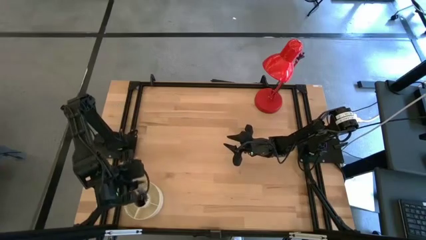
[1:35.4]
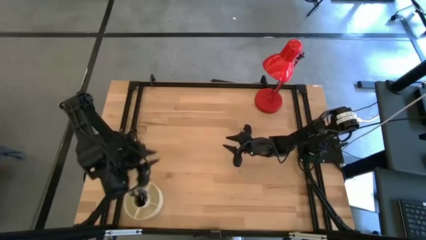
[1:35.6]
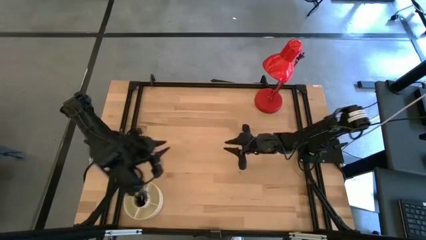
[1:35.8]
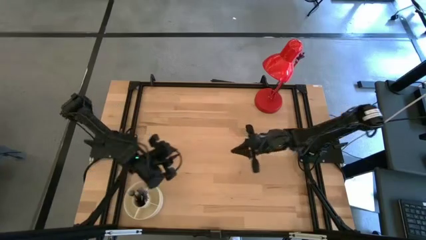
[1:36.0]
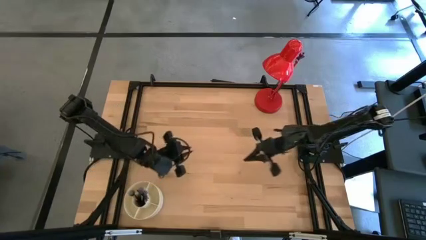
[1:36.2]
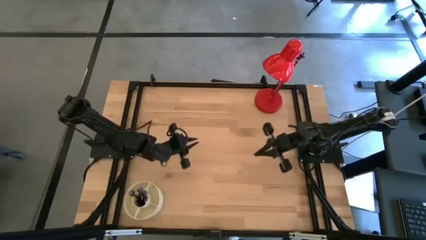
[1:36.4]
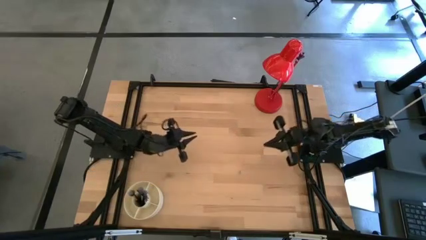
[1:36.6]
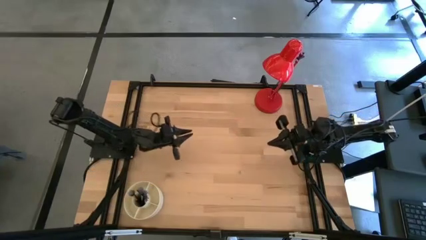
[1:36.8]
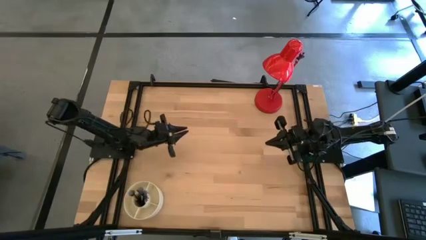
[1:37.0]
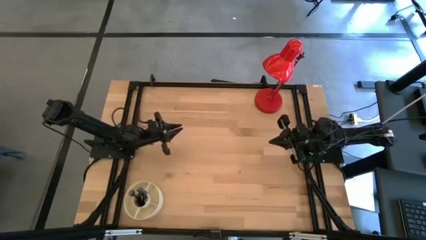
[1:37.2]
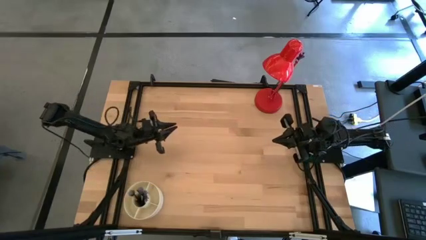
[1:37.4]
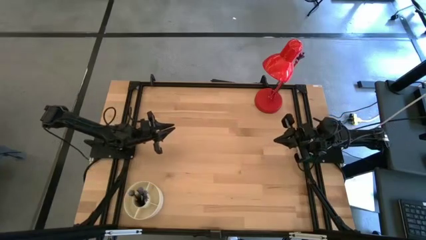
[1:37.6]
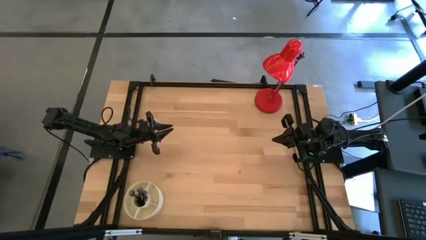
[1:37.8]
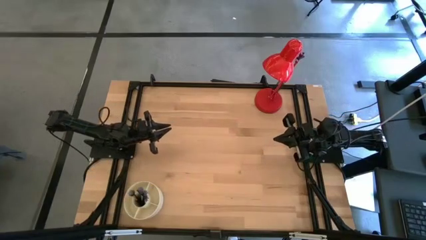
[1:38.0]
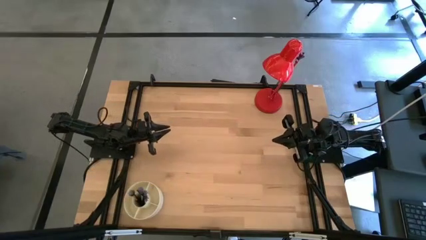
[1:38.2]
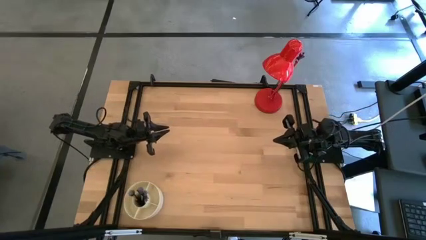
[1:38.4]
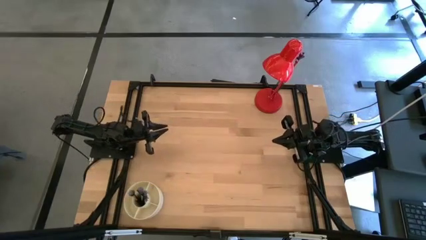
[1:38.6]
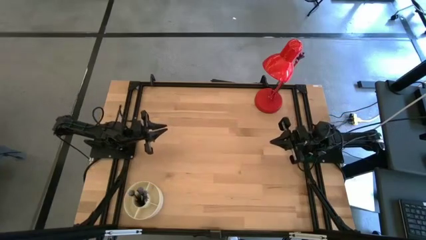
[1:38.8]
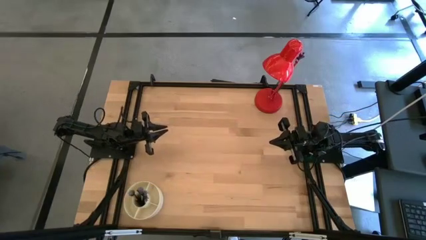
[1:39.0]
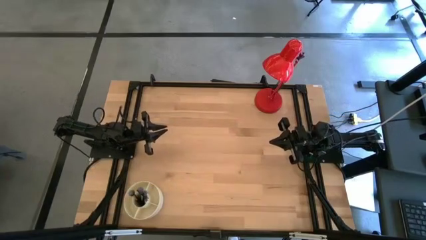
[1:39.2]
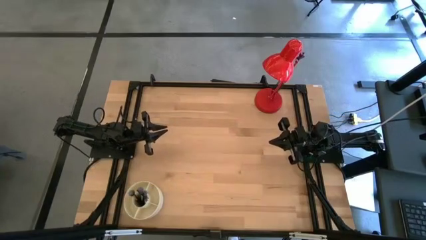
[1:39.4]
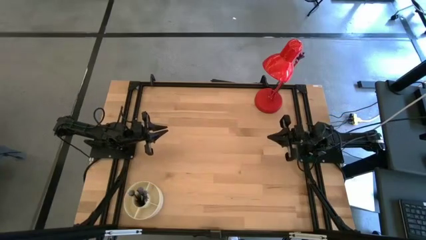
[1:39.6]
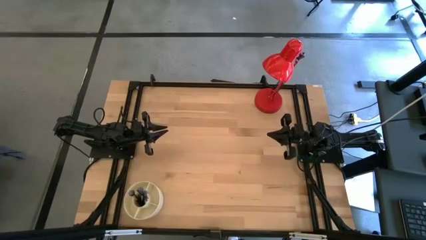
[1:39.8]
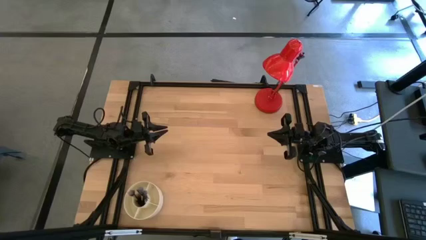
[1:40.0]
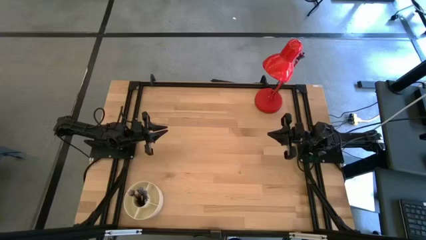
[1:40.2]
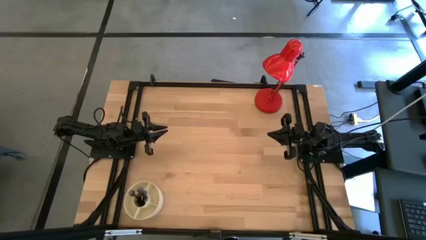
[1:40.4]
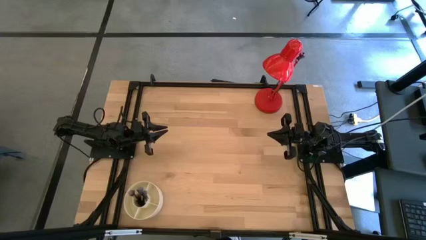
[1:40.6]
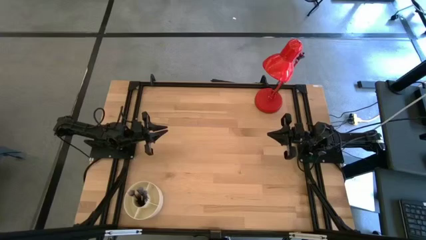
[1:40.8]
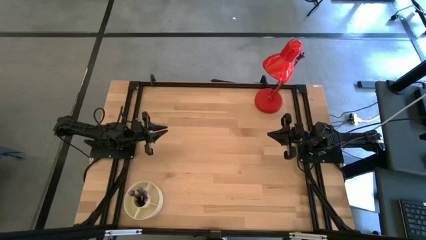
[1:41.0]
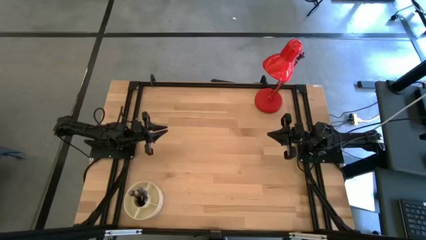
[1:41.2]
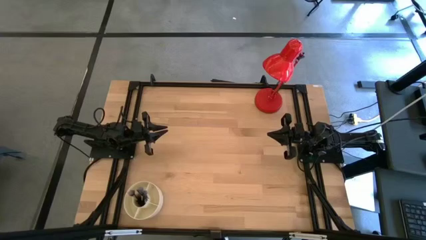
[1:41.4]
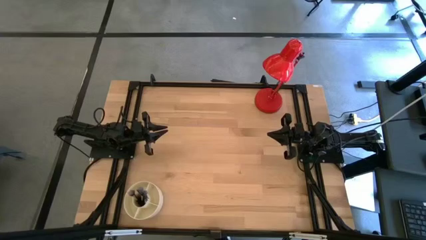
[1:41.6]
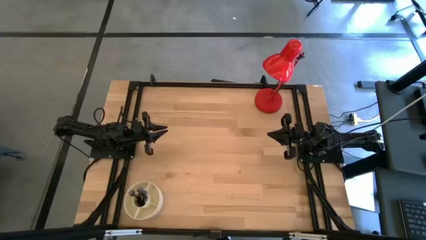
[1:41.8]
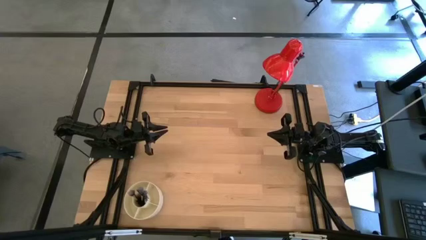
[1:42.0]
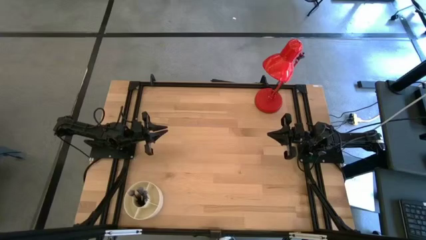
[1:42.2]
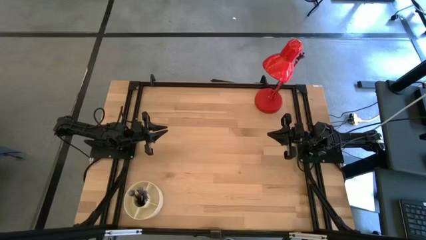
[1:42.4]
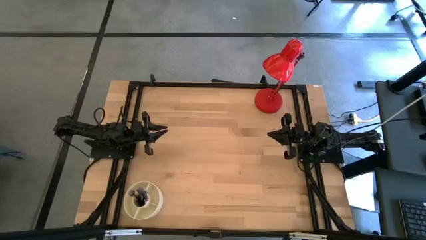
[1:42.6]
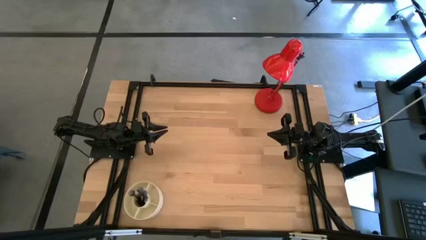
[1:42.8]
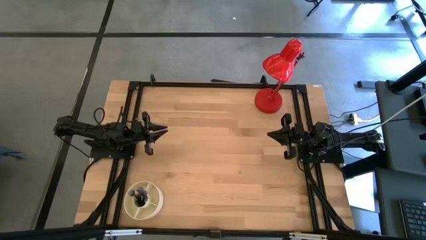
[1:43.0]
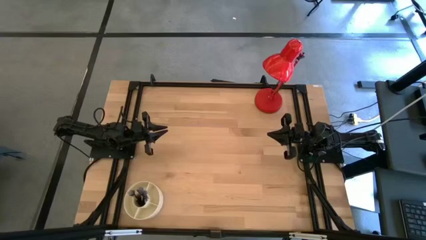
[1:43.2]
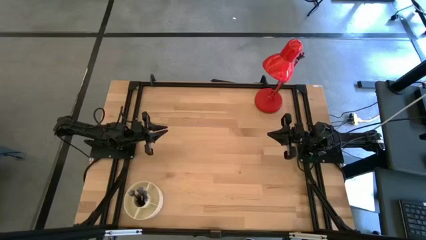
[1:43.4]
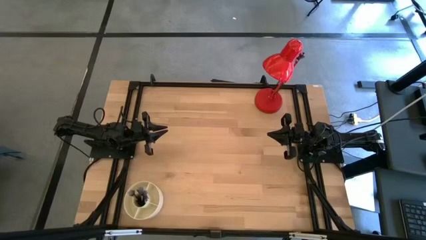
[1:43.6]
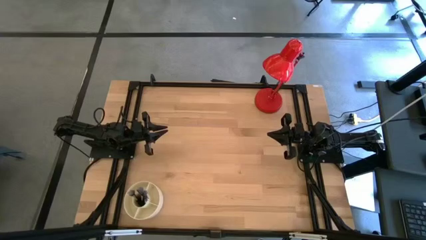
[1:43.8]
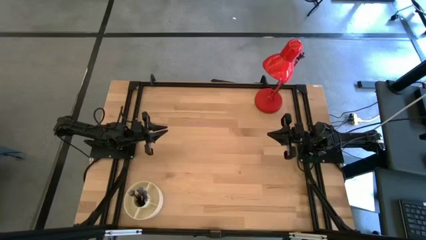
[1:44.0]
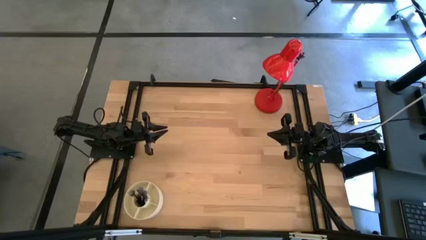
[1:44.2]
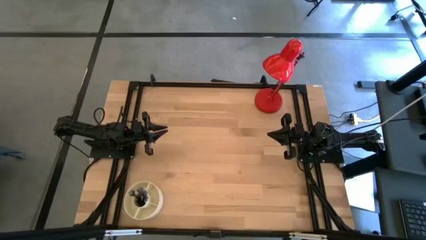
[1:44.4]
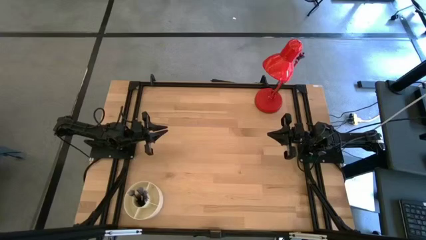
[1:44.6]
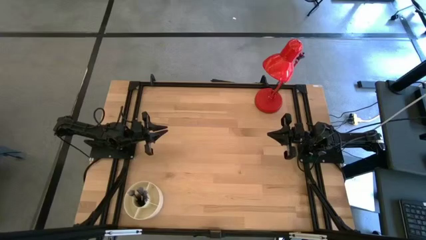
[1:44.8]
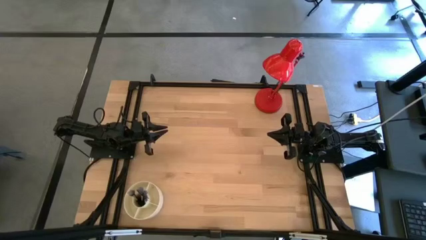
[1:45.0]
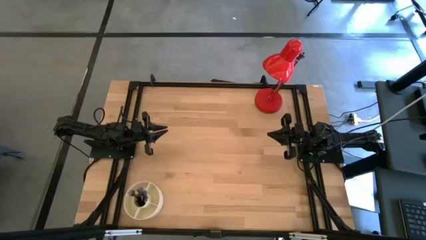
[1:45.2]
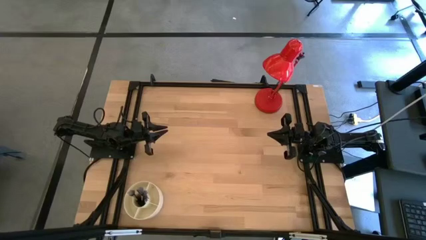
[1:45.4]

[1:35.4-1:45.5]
Task: Pick & Place Makeup Brushes
Return to Home Position

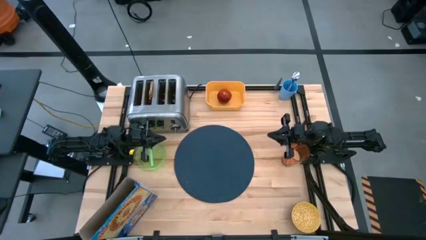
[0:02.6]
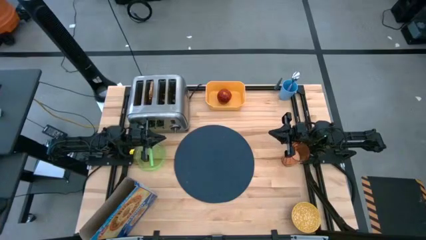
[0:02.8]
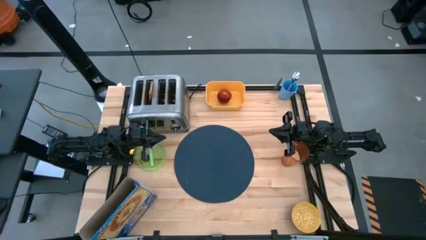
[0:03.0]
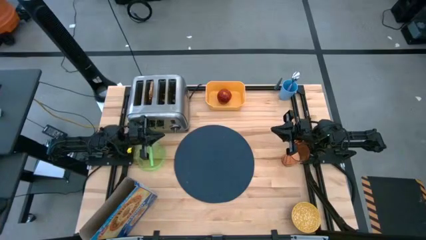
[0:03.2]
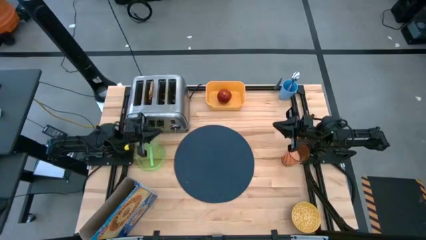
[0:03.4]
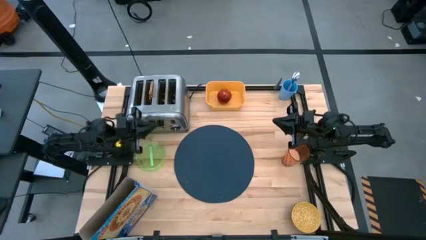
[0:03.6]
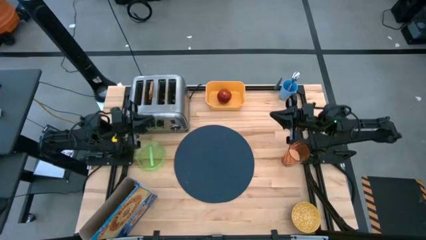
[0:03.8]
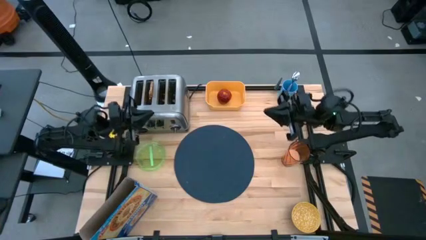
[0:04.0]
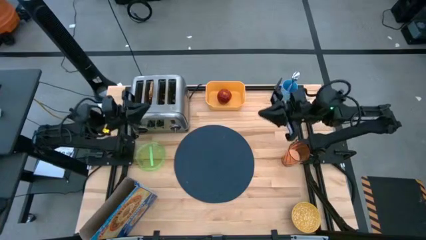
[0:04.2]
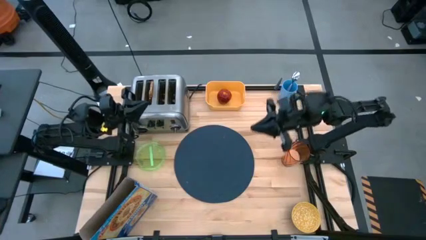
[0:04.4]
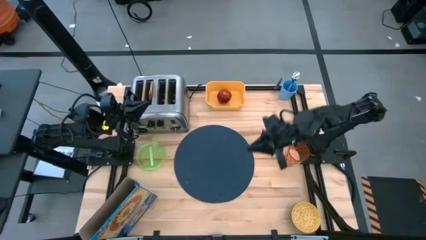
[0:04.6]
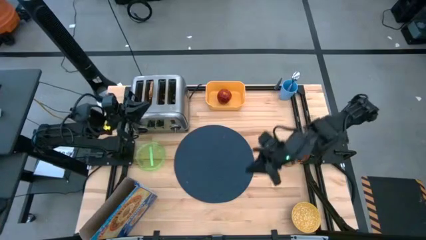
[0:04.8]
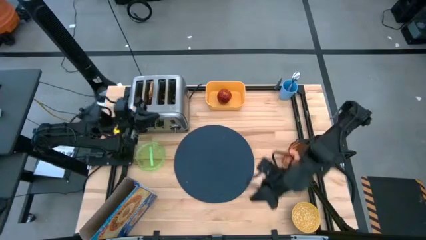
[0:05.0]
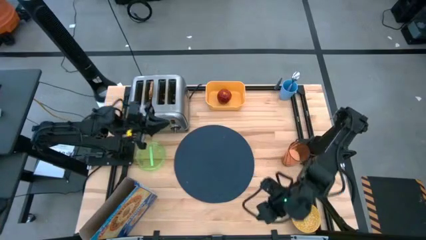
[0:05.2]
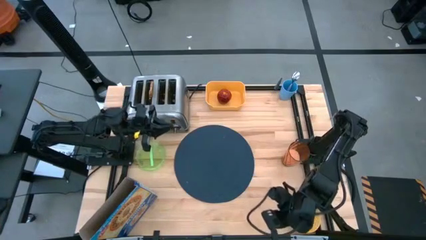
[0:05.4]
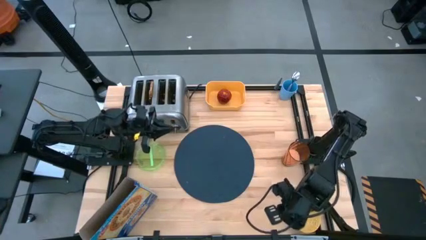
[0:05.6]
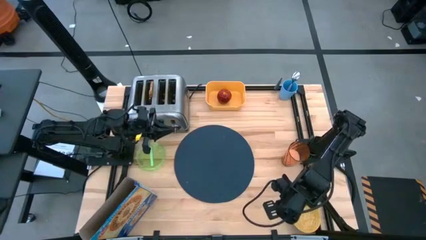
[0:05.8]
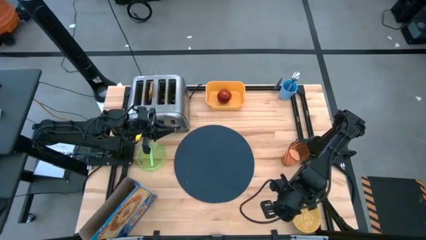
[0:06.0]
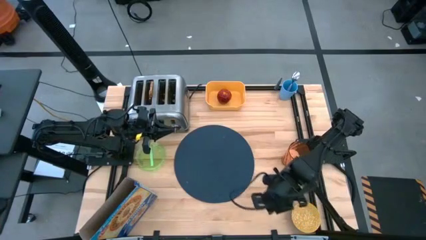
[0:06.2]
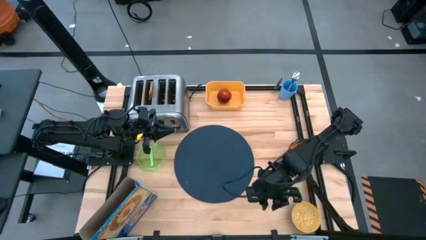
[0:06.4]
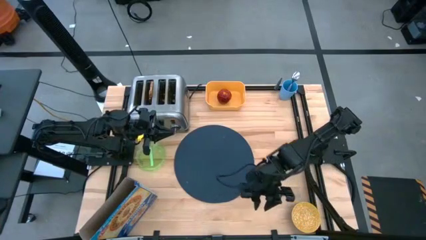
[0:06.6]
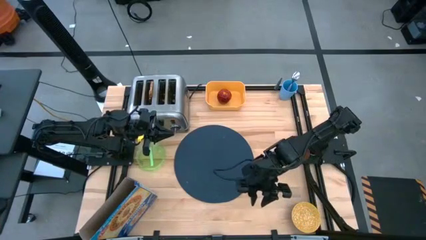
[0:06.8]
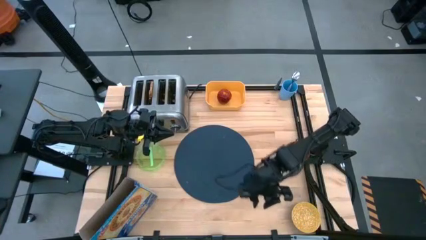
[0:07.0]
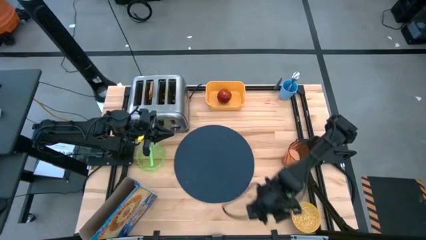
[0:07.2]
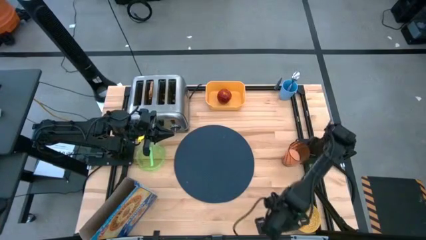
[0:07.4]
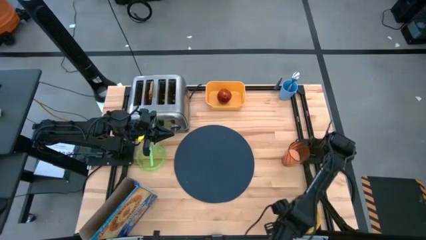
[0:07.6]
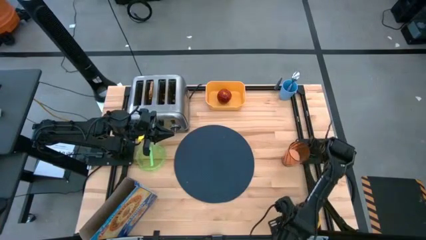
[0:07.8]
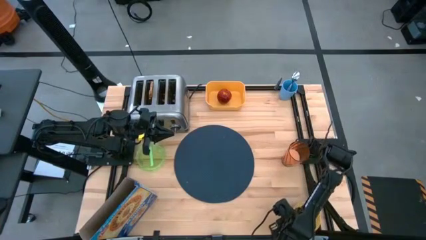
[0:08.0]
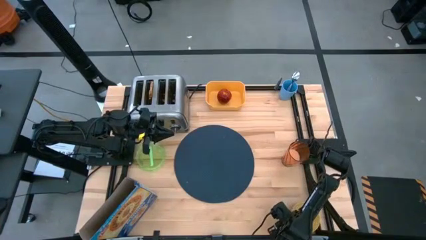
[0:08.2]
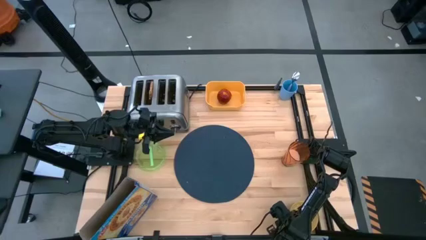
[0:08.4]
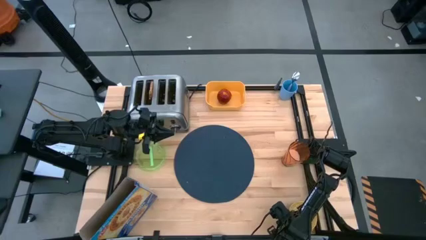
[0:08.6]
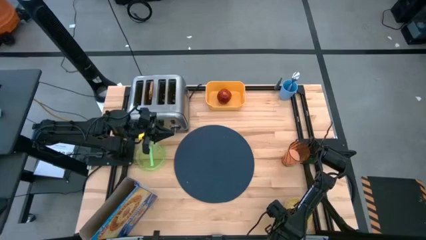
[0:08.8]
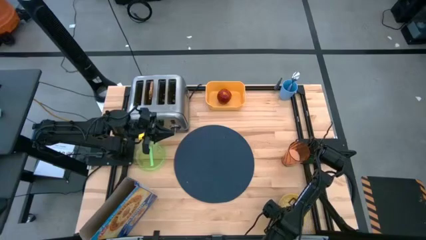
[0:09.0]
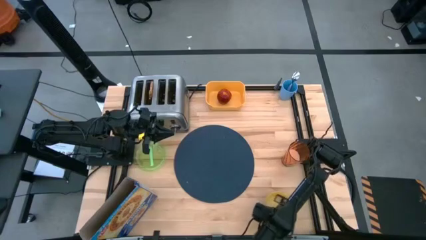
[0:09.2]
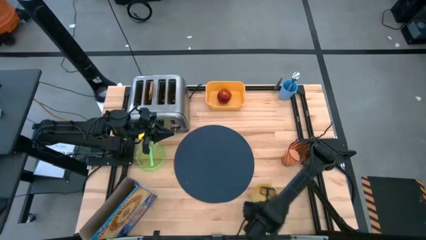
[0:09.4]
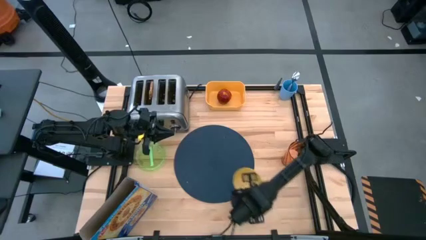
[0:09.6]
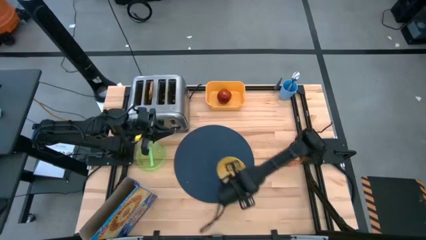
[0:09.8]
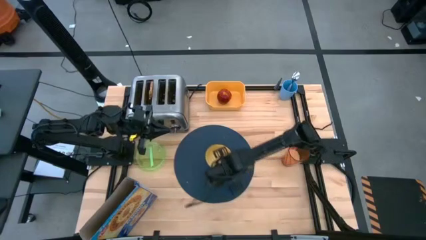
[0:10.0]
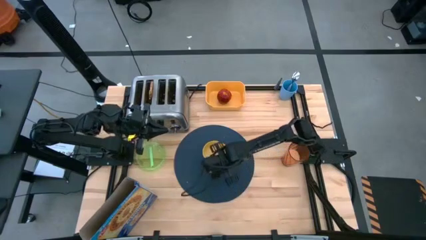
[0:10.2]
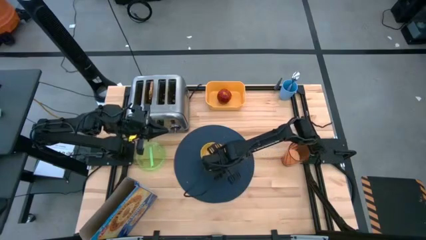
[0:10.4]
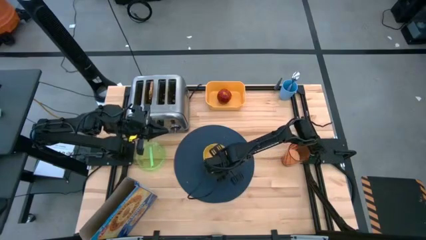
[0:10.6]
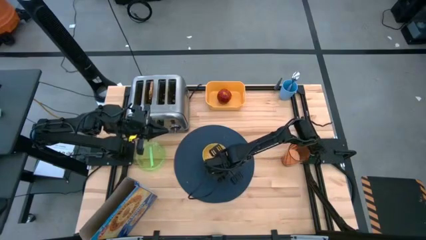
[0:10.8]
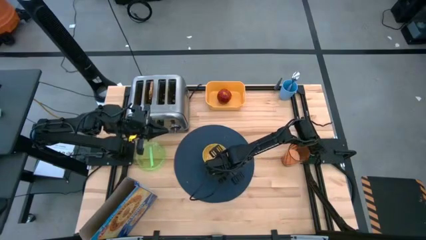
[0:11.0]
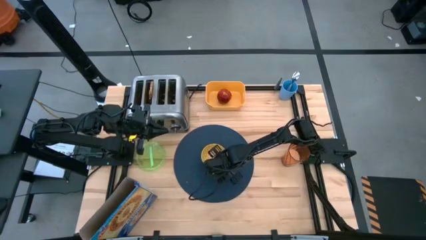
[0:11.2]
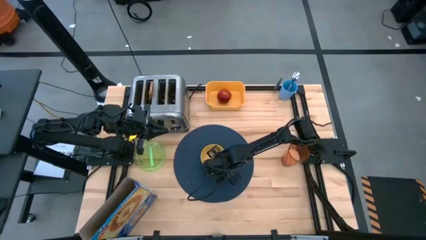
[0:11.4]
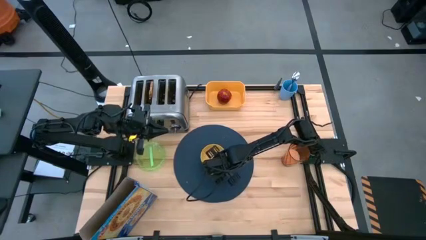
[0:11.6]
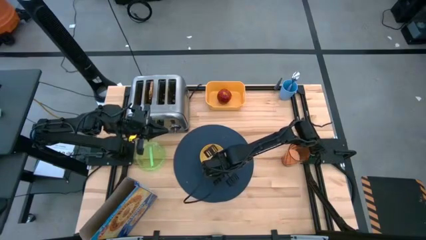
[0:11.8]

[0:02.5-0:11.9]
Task: Arrange a breakfast setting
Put the blue and yellow bowl on the blue table mat
